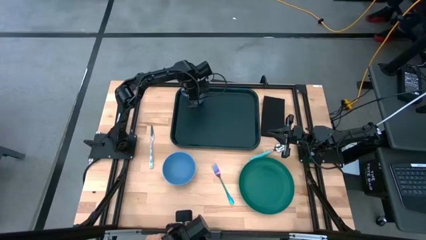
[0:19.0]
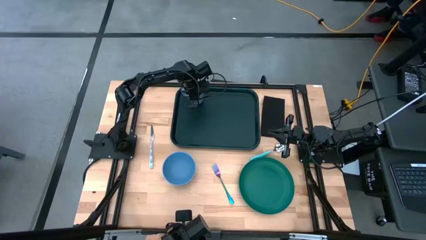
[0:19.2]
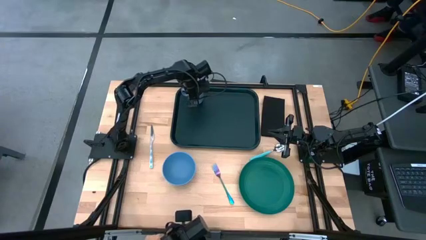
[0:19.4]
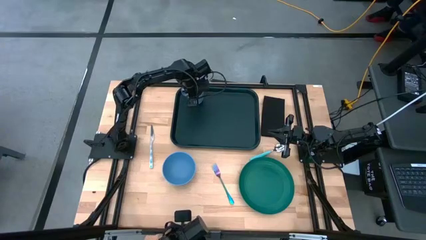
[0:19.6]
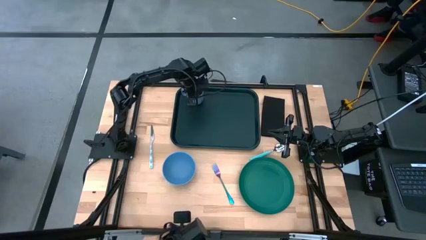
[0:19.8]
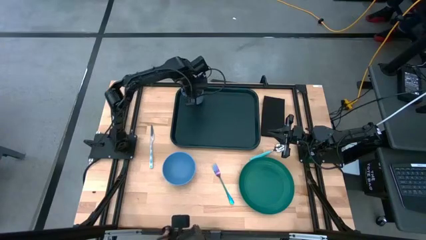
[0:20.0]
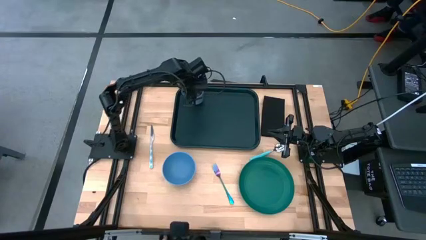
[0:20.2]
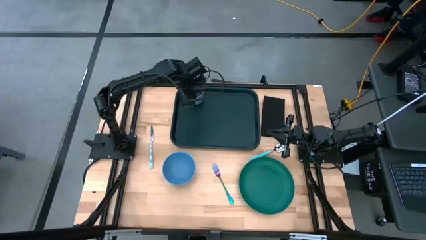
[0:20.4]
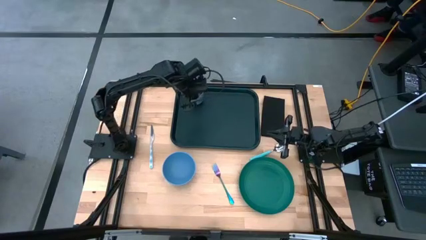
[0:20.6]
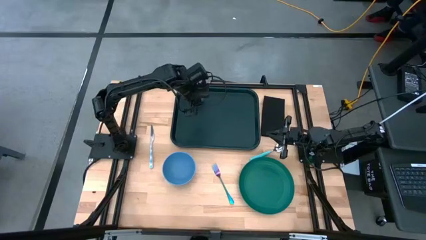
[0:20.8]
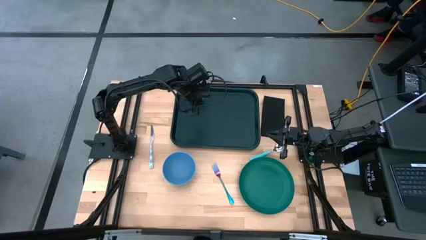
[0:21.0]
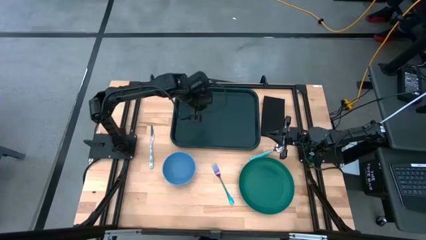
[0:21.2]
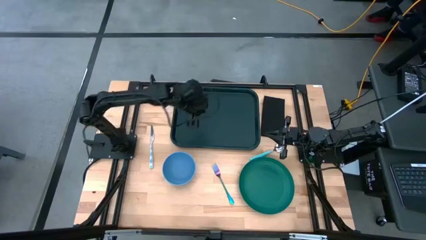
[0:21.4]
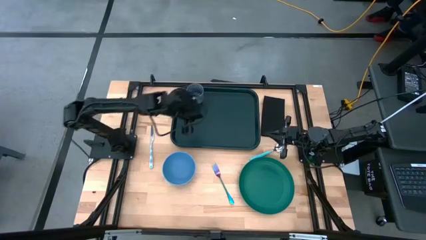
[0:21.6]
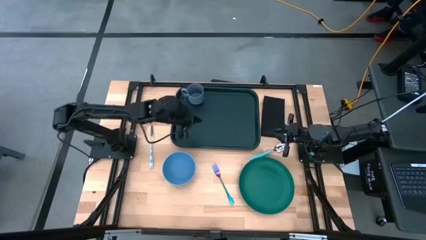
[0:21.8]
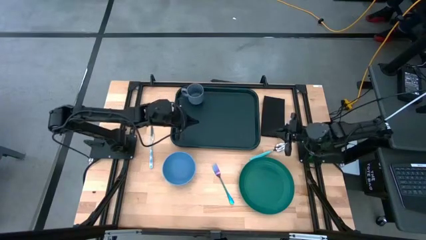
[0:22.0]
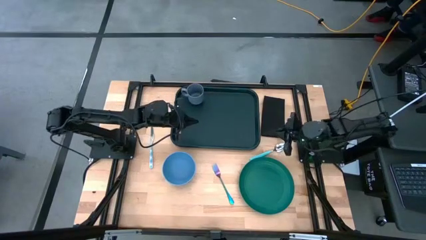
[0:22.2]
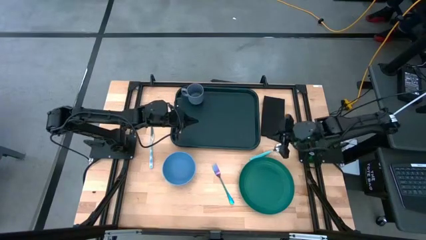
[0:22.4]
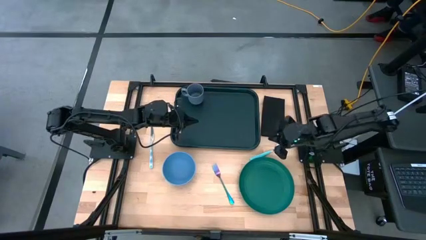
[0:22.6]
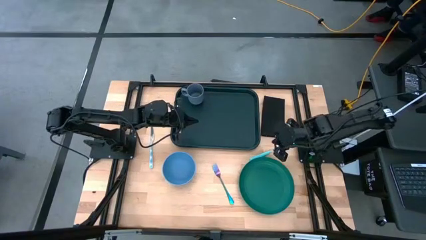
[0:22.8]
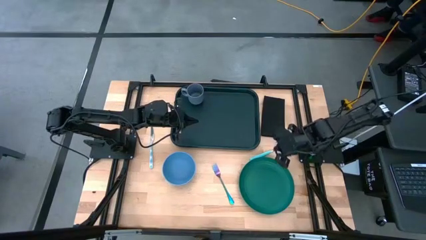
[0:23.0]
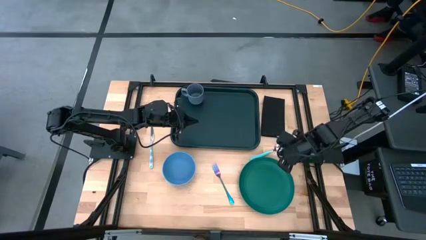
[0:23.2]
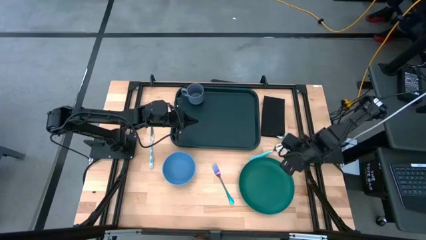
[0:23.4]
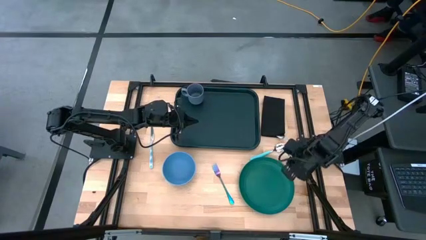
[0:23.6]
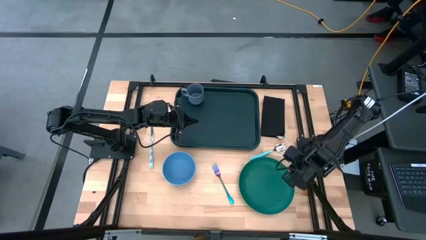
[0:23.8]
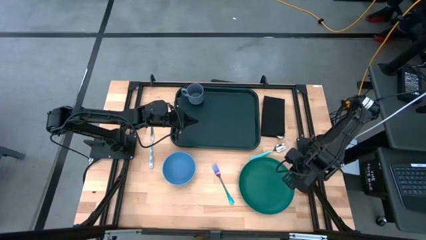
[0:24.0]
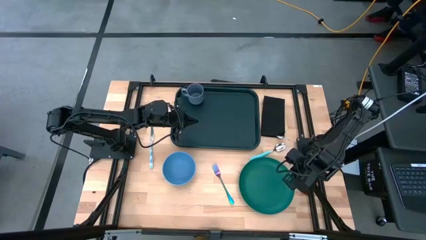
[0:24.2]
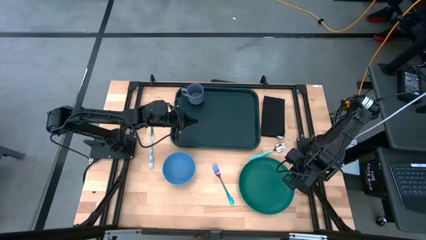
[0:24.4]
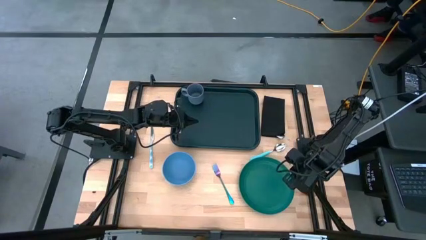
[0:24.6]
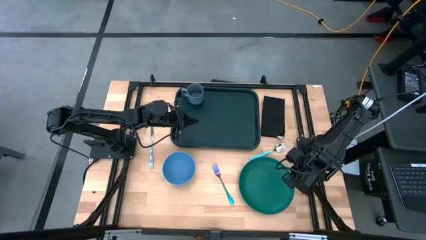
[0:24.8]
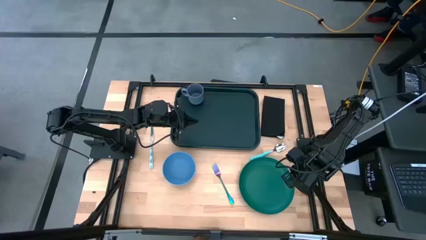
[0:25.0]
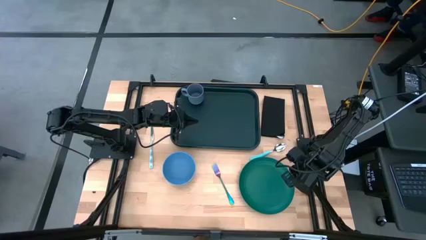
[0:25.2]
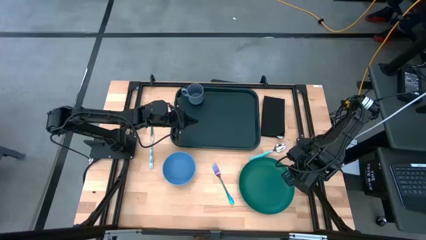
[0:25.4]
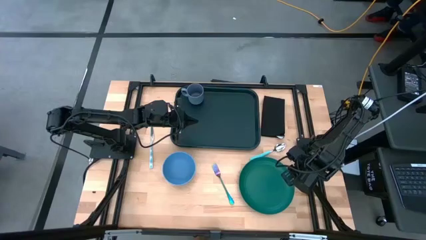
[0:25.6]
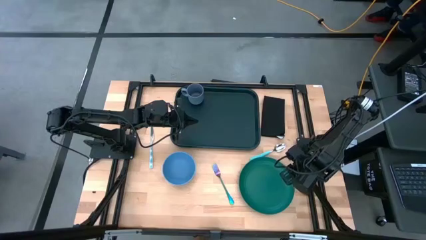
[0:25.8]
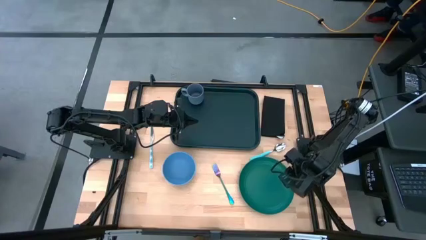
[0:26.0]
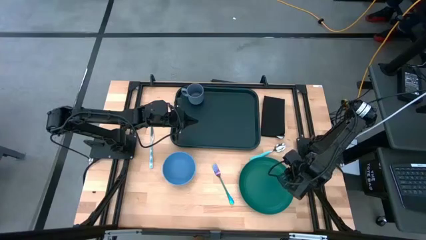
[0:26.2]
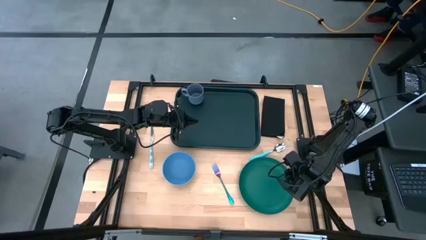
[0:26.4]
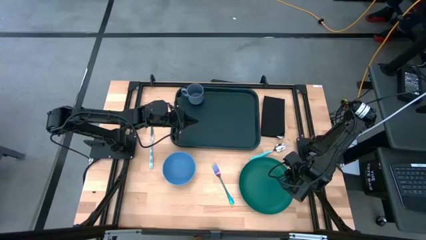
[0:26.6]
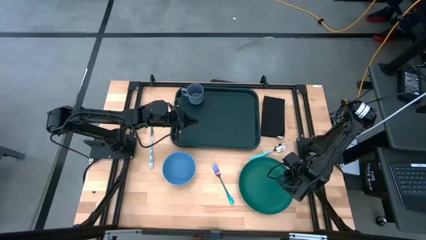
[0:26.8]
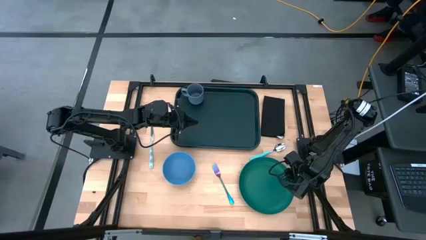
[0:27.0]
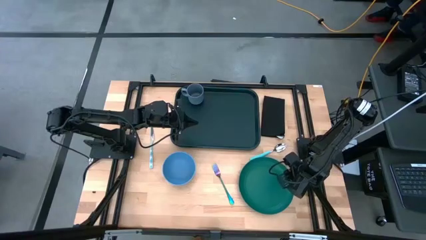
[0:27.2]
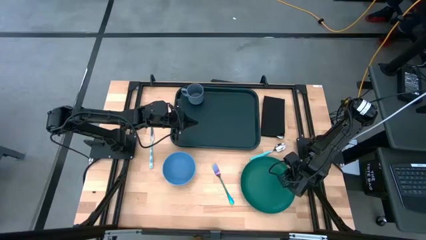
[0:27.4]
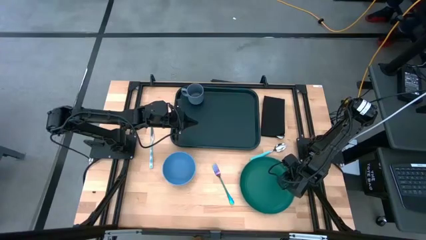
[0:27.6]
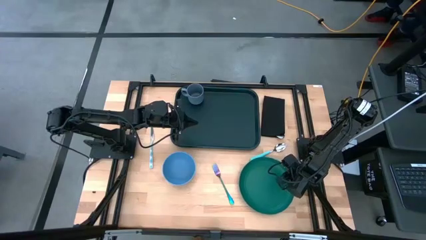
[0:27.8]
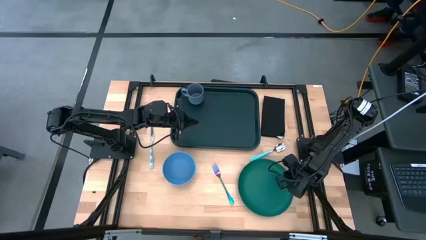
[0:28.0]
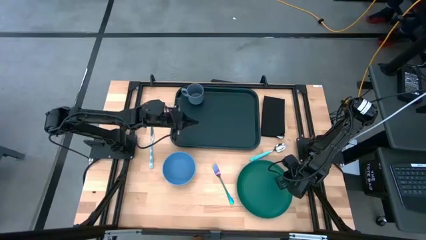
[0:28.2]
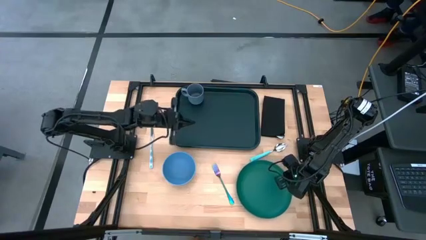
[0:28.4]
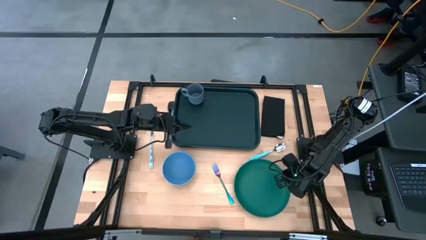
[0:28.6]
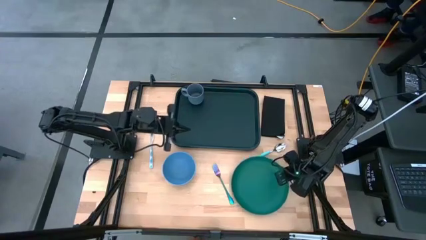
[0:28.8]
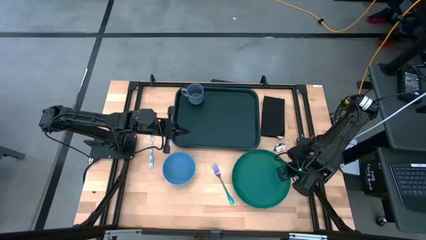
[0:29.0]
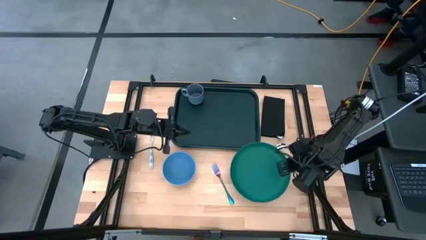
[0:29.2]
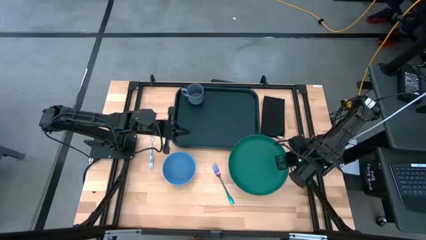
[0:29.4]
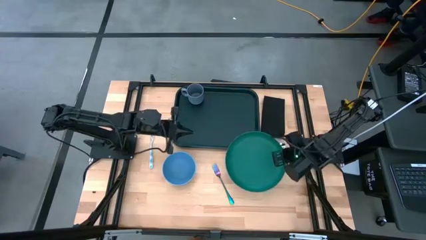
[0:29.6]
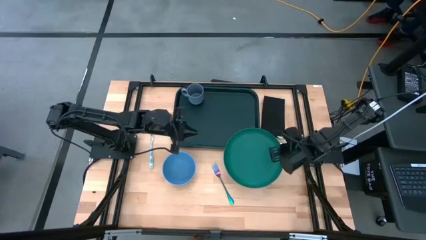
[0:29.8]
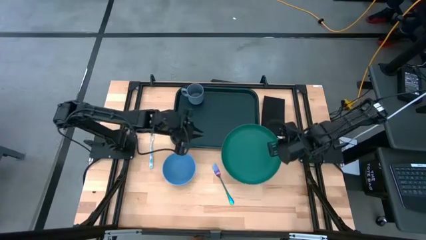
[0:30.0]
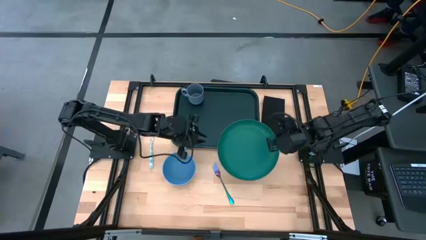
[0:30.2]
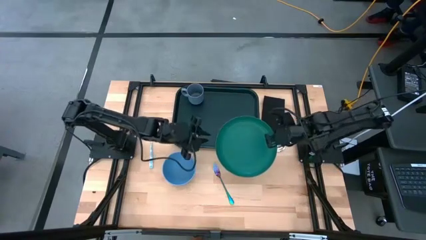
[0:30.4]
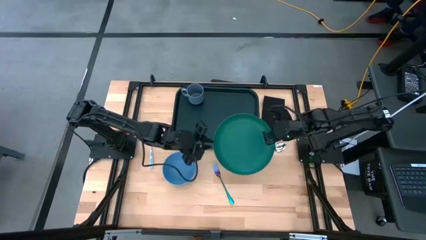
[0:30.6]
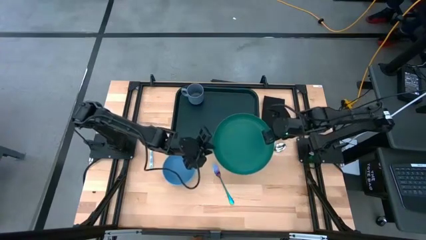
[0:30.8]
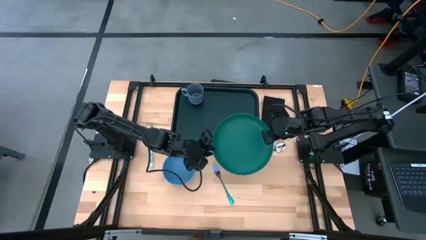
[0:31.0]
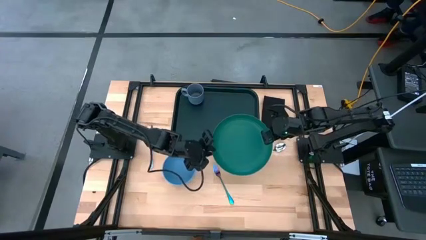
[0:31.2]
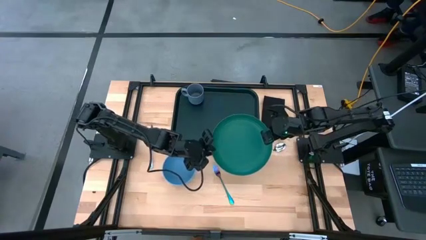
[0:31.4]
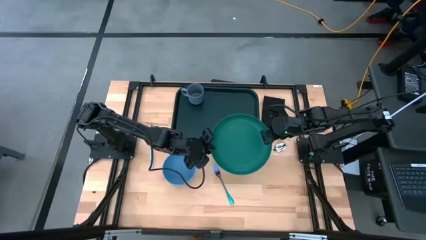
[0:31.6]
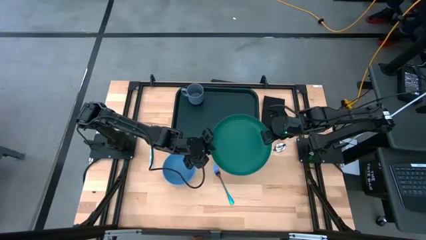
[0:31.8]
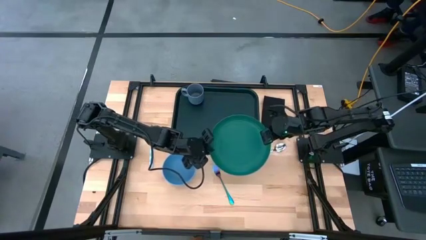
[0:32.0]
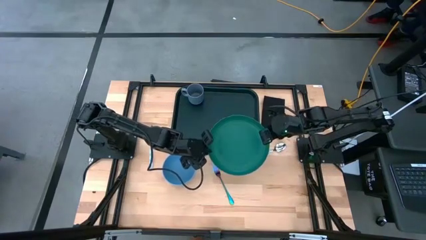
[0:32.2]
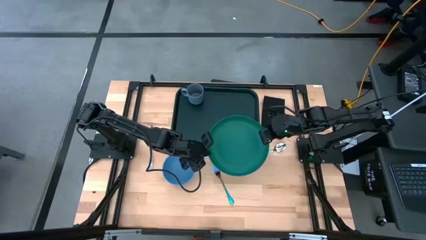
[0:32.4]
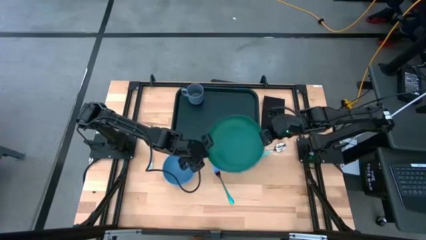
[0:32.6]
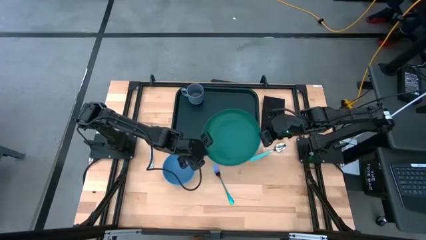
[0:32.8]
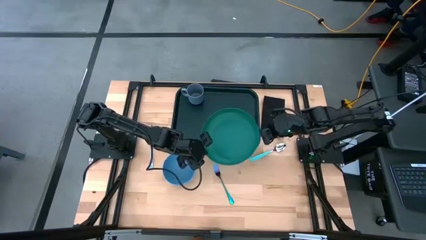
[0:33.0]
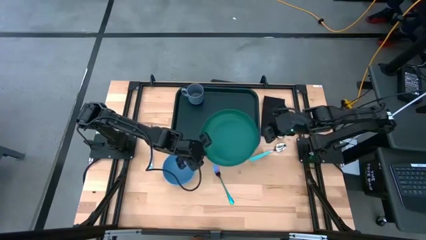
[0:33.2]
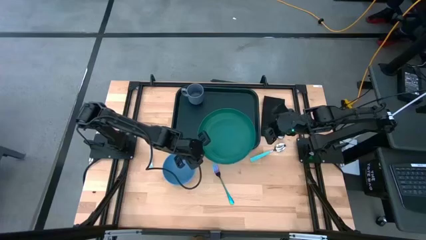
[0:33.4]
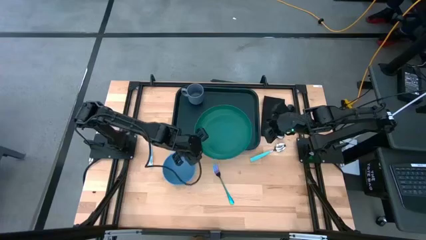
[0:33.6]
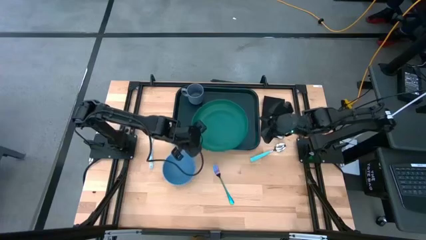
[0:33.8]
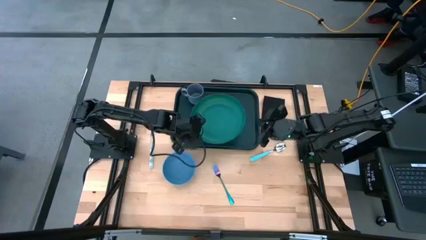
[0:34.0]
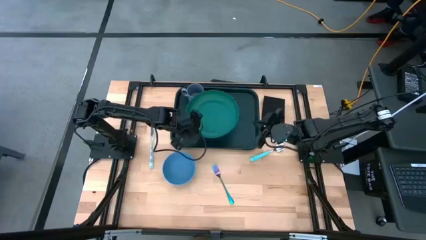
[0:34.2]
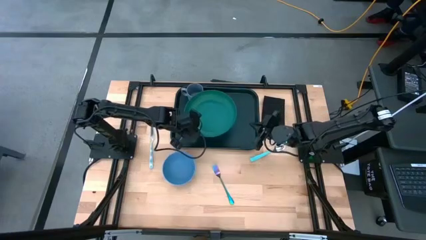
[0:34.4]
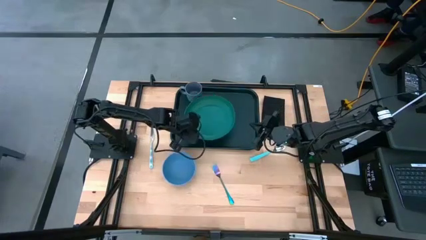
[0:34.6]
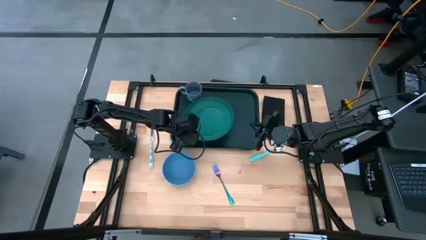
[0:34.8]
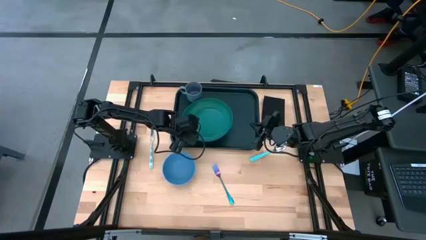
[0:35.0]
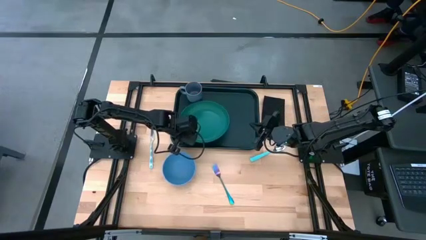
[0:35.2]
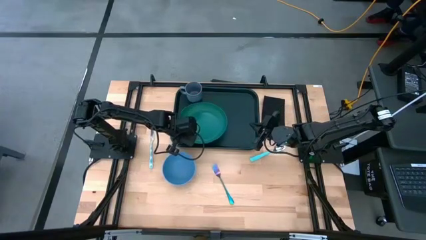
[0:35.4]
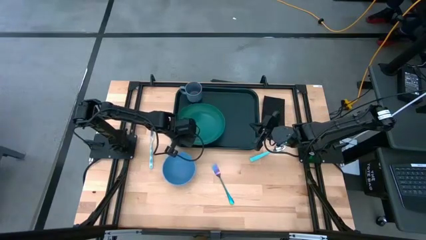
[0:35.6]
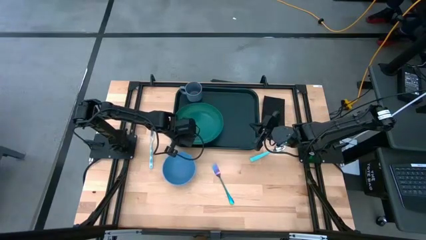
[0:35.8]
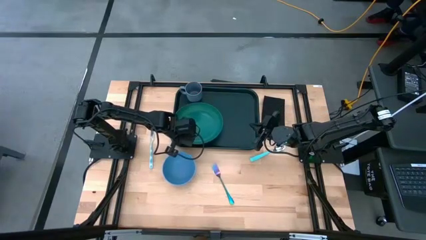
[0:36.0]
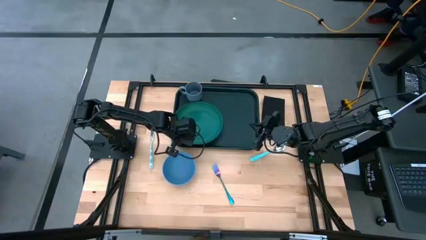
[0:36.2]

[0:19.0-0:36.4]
Task: Set up tray
Put the green plate on top of the black tray below the purple cup
